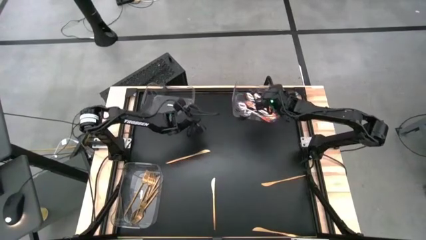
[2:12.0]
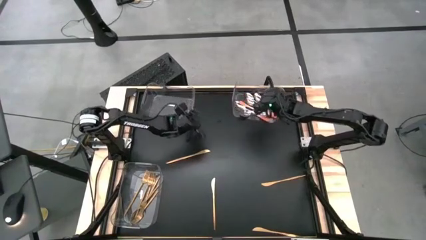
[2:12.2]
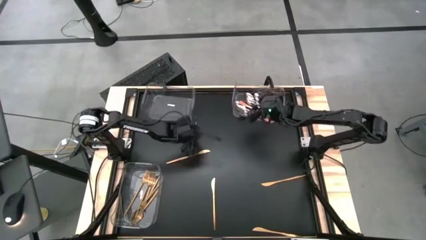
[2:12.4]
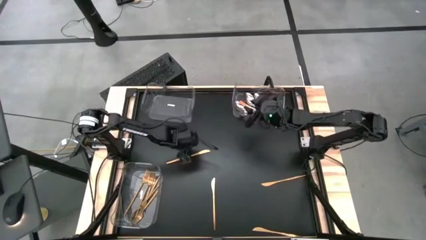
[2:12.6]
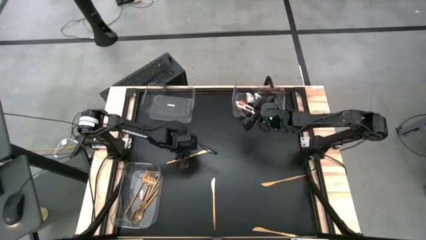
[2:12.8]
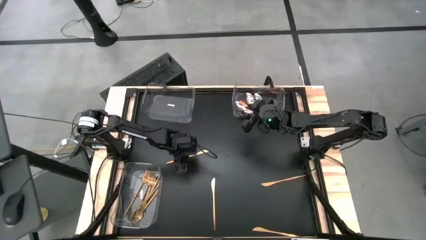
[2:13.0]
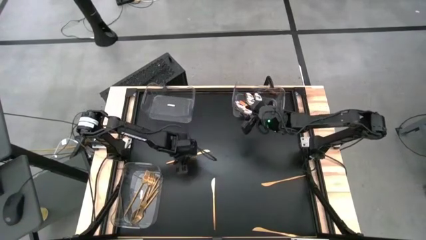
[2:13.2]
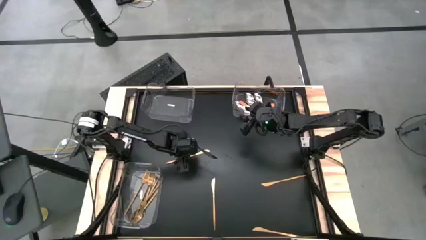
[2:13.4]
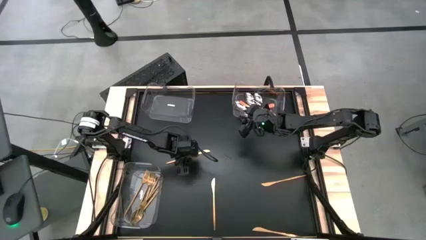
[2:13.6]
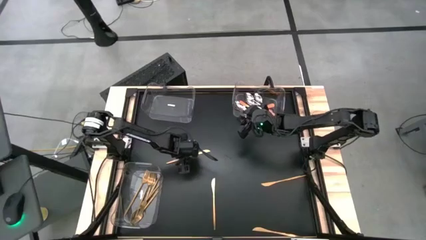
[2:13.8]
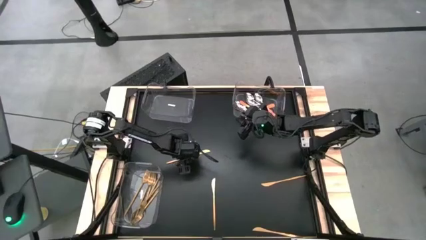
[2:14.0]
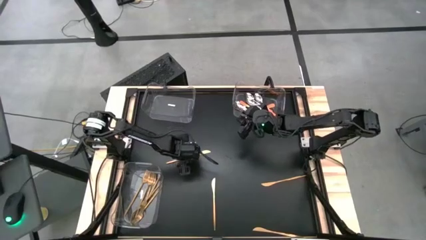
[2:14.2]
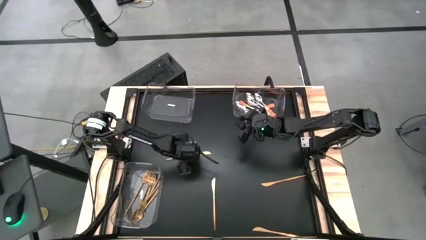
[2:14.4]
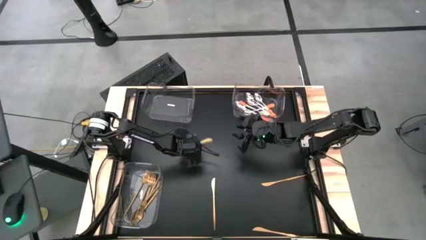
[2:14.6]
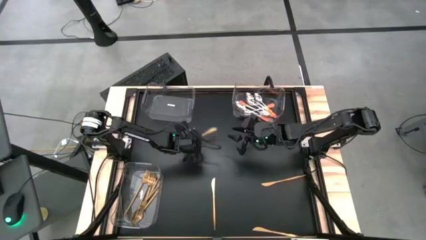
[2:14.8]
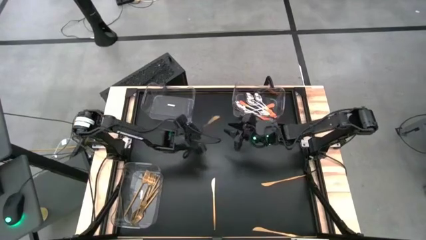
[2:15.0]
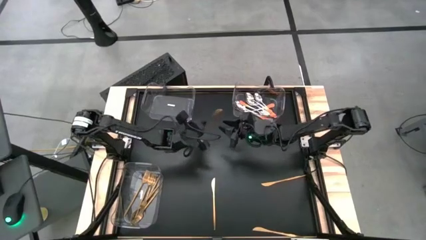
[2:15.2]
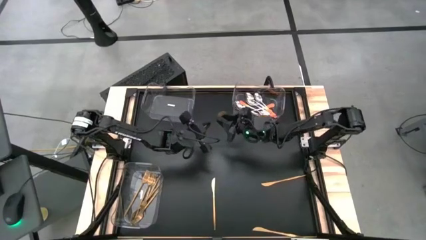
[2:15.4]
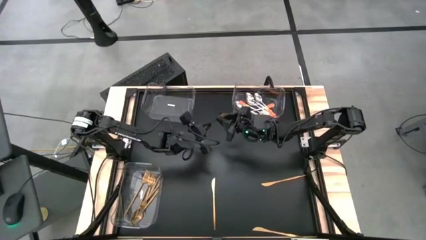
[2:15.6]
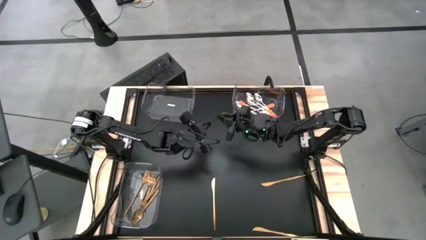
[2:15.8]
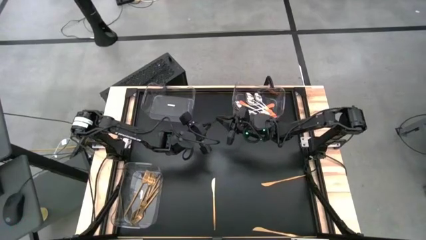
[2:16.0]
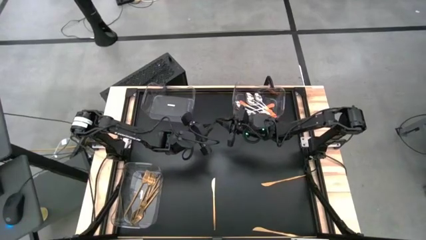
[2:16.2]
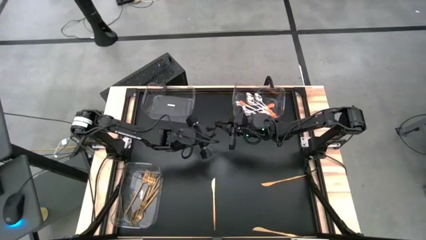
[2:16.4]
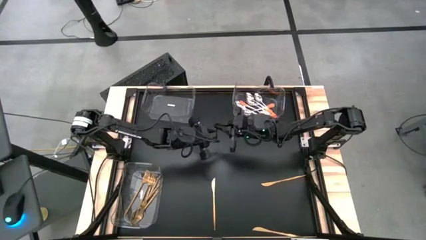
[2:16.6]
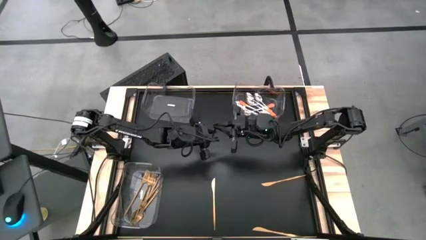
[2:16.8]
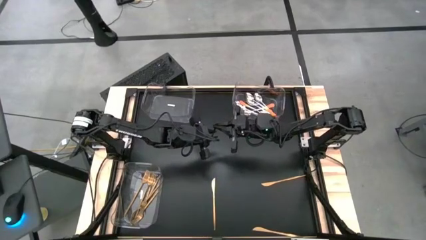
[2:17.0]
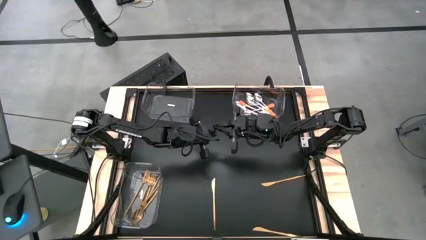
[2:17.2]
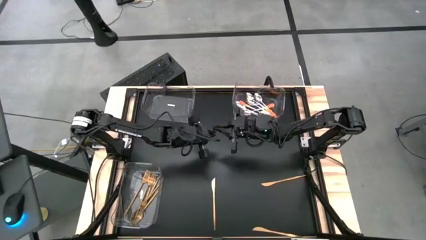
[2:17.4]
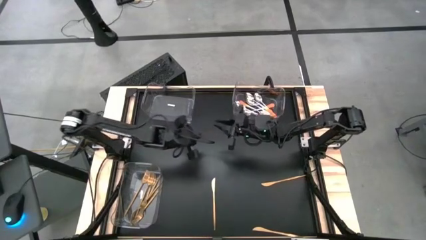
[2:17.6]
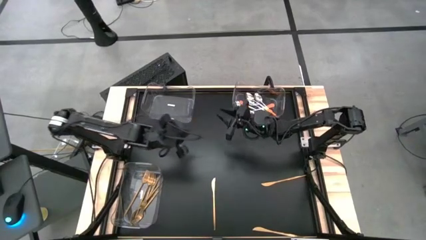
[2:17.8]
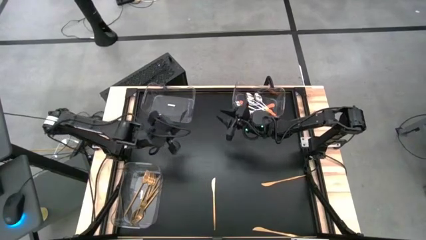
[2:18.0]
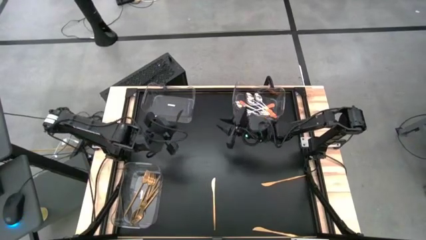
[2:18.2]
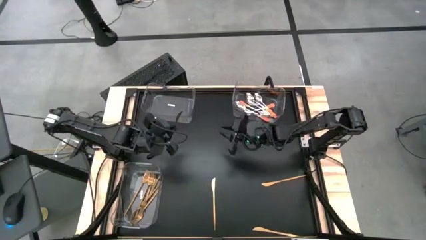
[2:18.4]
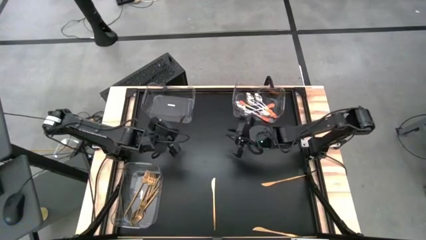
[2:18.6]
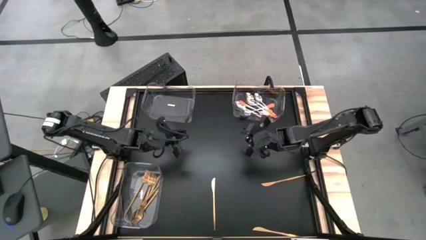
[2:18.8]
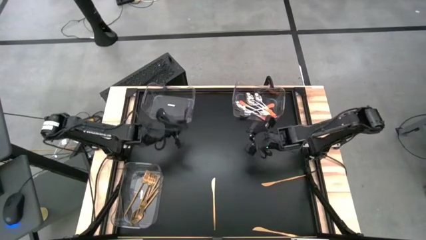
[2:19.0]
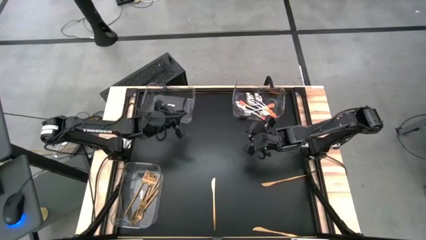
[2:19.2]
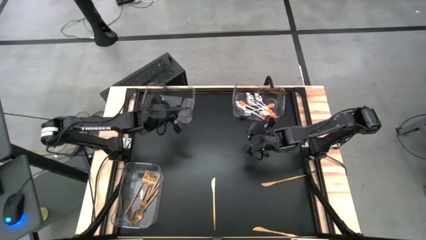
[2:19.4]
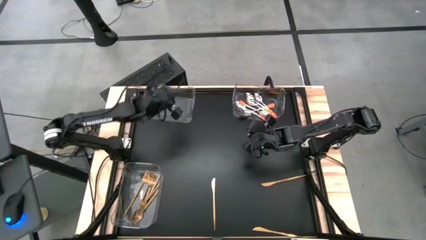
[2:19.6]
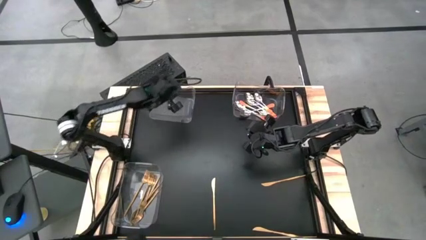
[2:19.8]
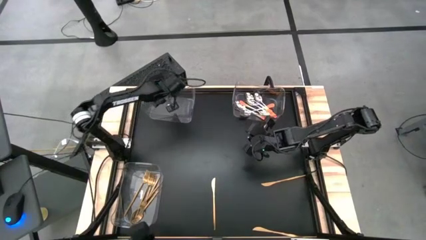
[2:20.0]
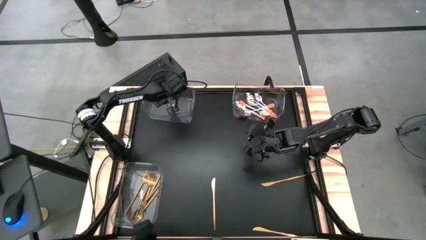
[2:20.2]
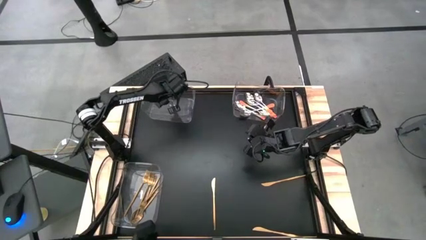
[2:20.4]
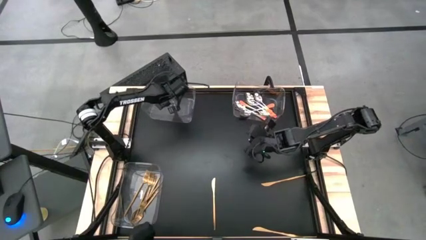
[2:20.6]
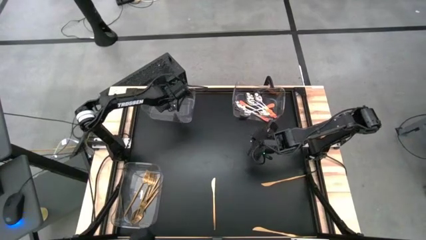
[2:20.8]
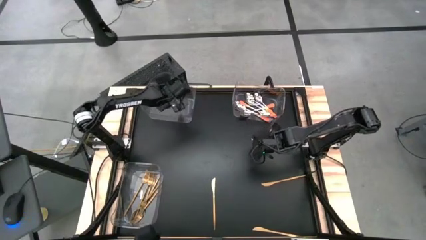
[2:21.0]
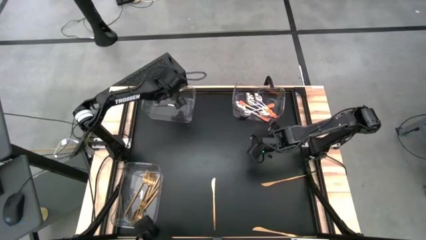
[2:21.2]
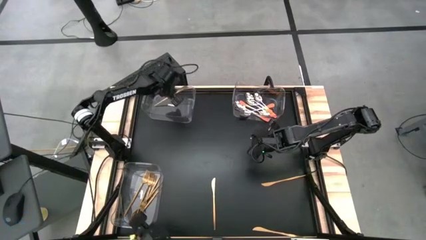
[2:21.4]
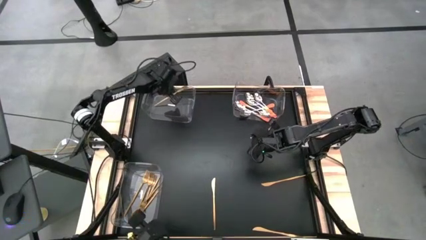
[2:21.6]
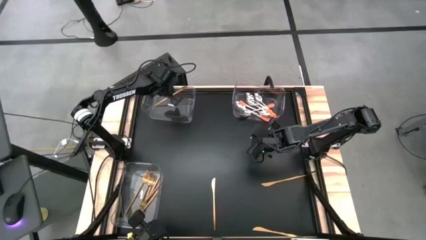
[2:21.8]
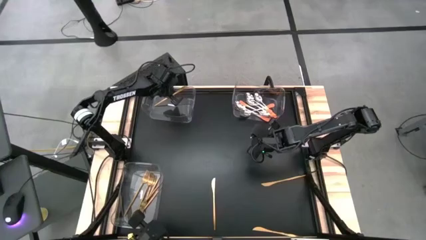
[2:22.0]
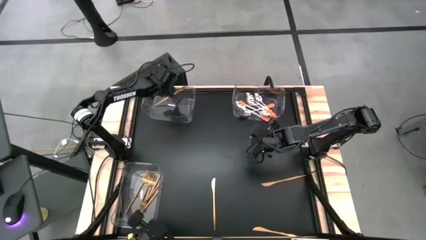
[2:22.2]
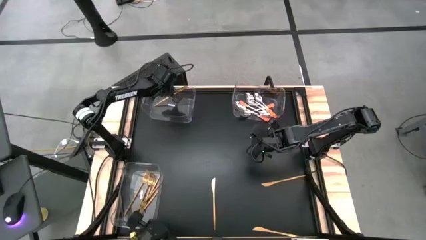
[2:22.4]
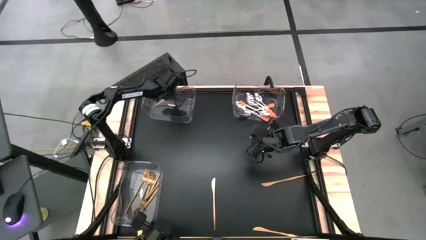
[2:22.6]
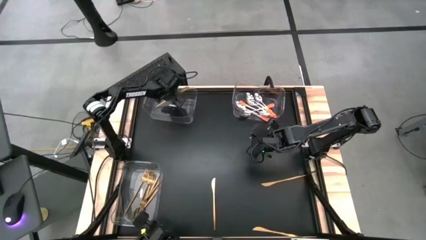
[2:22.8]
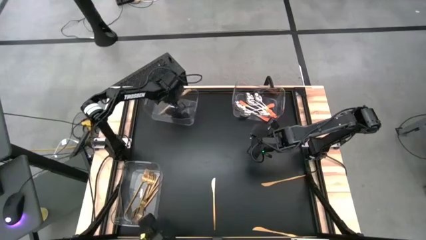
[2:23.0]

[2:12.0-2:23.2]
Task: Sort silverware by color (type)
Put the gold table knife into the top left transparent bin

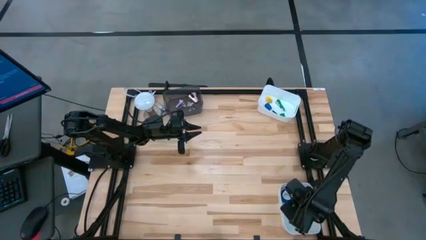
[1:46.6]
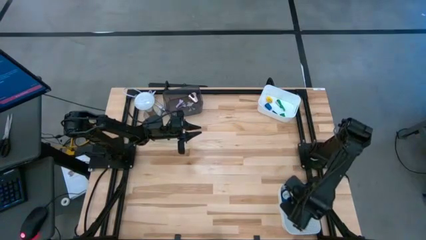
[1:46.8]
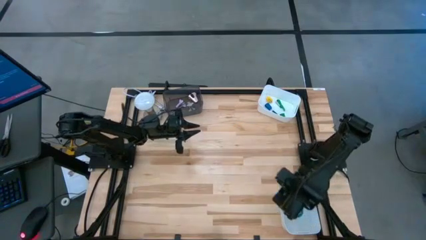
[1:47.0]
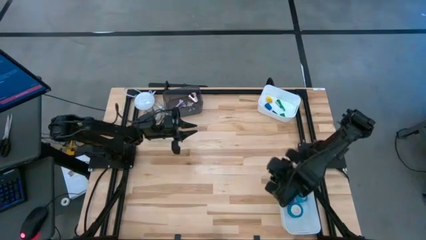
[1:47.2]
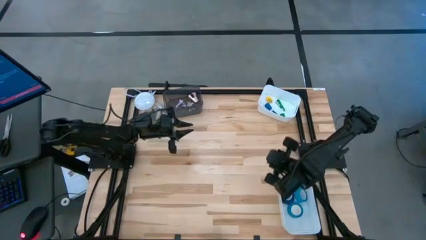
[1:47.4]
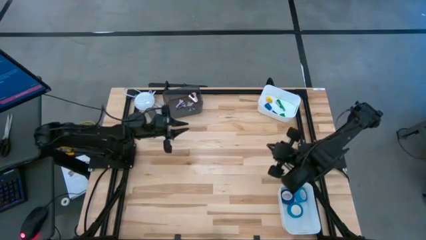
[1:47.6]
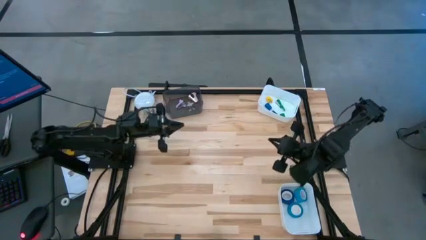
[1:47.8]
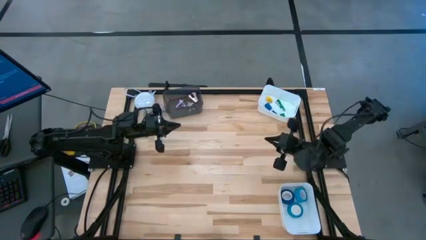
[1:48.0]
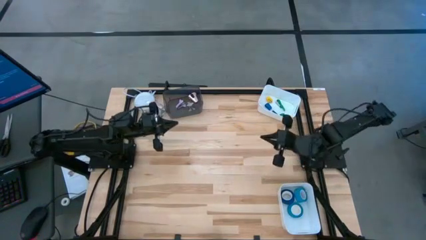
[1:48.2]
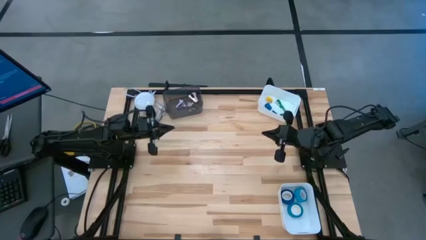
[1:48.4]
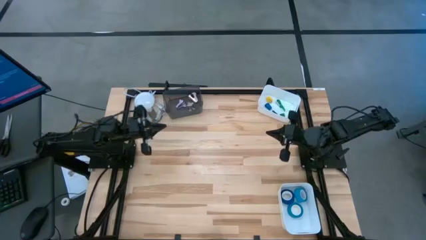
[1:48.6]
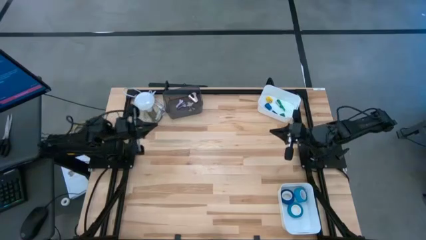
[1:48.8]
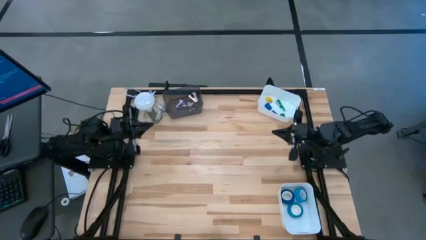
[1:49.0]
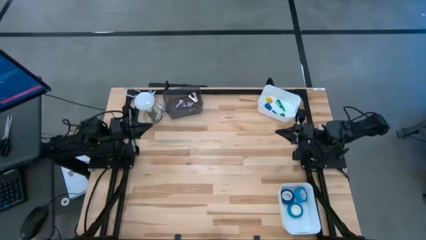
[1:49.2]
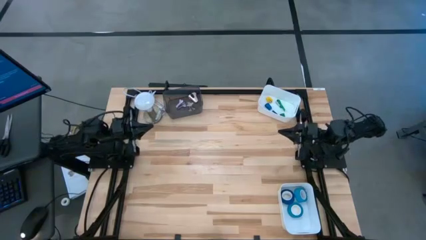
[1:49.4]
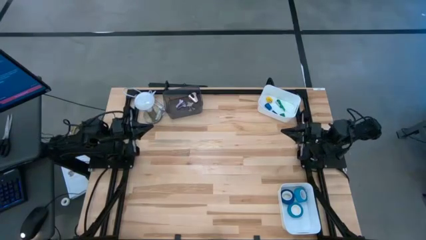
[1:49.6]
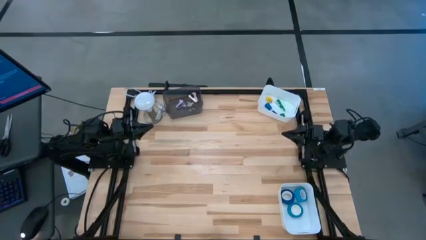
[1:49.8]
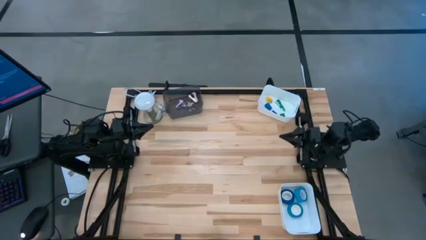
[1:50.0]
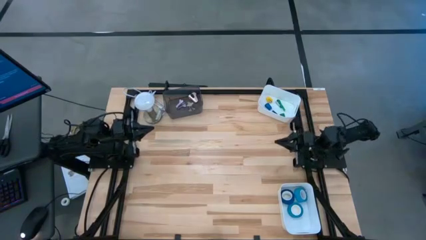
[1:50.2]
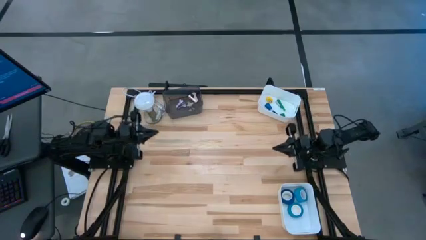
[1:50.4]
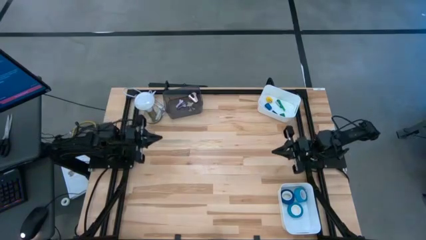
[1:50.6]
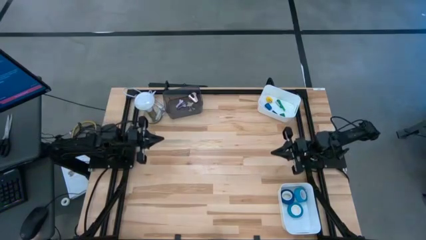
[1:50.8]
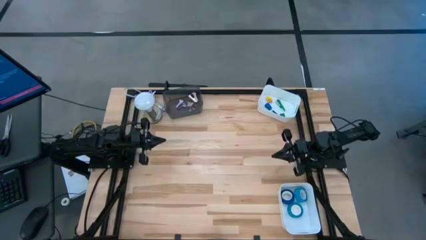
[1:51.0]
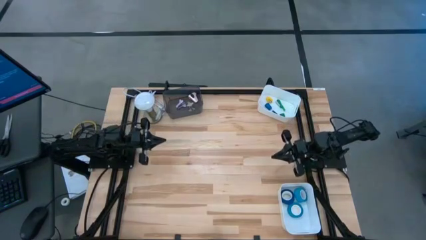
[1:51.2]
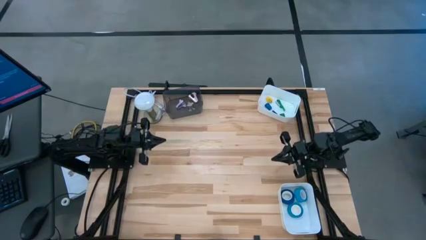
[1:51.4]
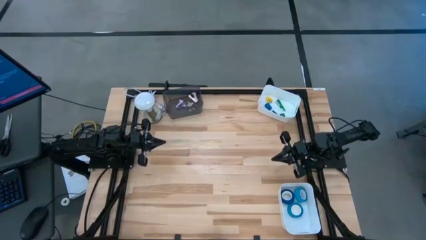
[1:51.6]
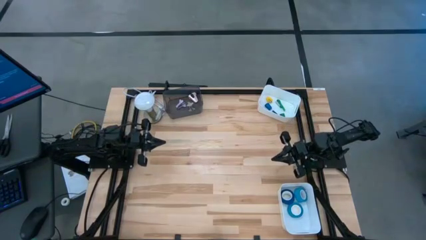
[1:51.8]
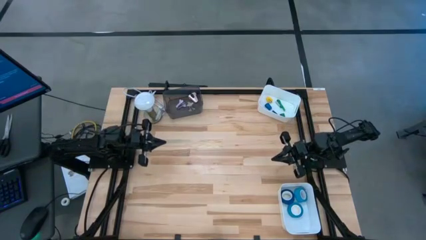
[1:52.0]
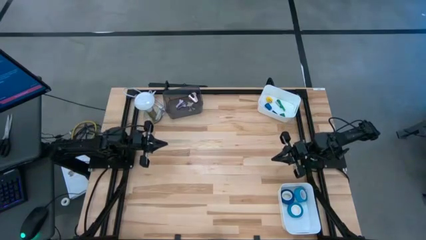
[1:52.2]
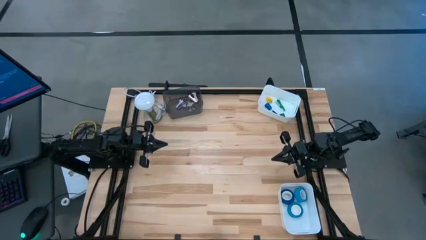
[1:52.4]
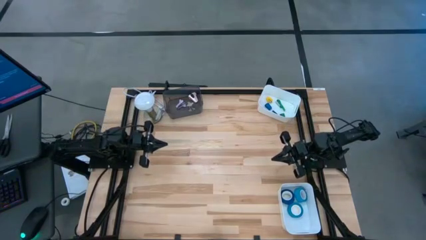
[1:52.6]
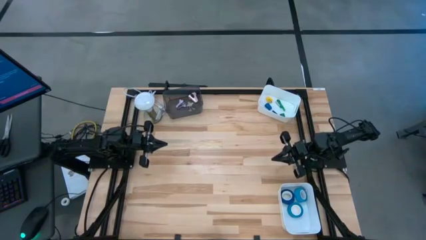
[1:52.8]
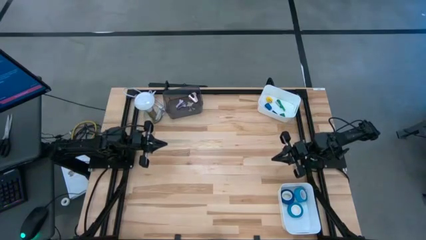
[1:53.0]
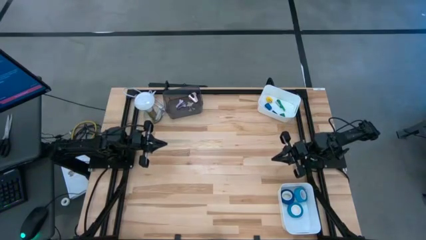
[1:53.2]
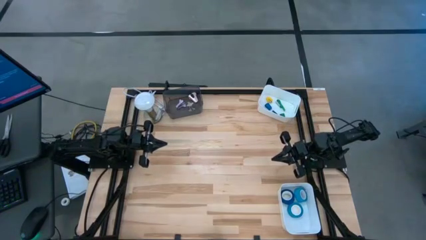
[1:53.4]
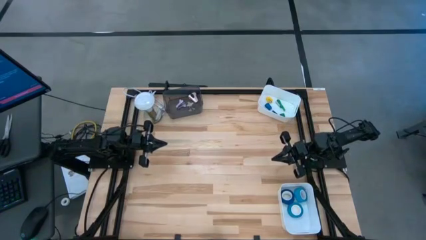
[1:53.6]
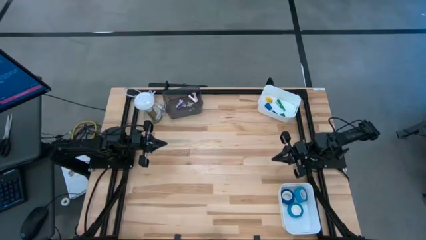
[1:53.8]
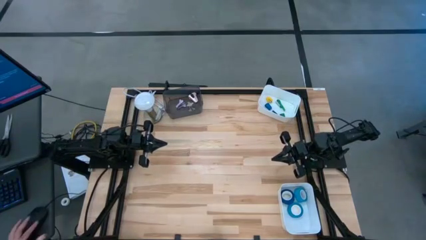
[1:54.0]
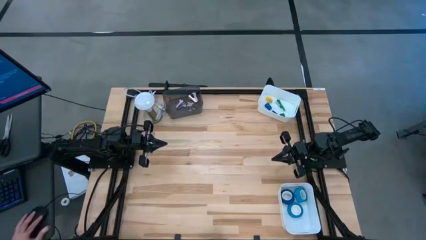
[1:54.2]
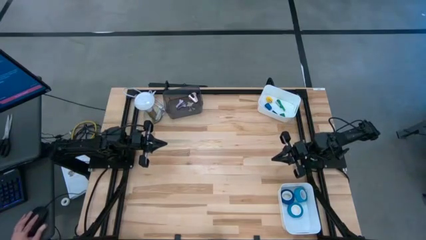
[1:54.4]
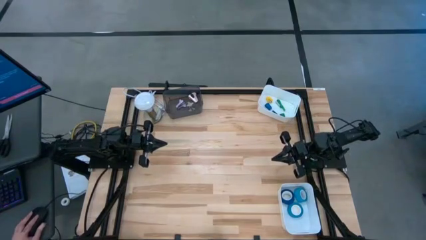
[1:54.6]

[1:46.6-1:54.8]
Task: Pick and place Stapler, Stapler remover, tape
Return to Home Position
